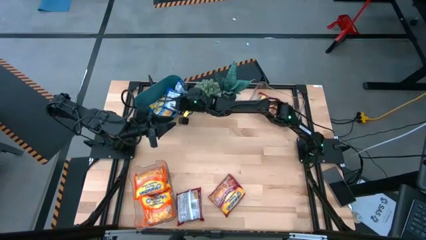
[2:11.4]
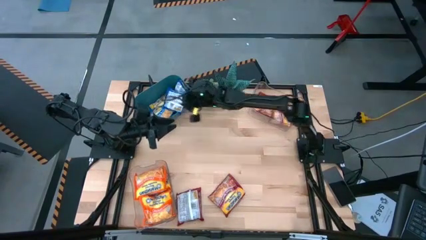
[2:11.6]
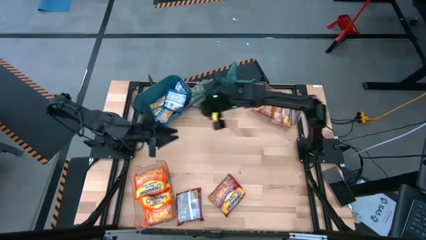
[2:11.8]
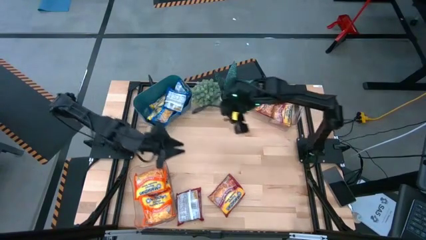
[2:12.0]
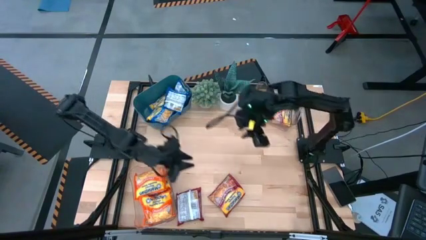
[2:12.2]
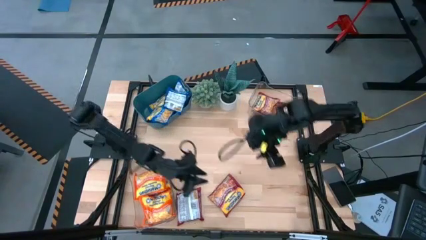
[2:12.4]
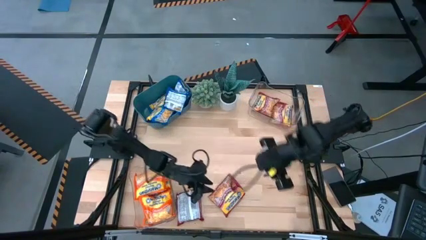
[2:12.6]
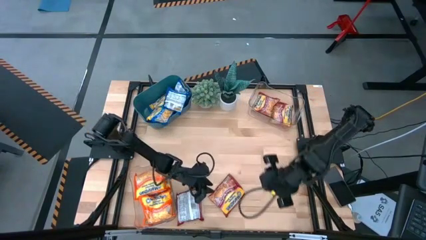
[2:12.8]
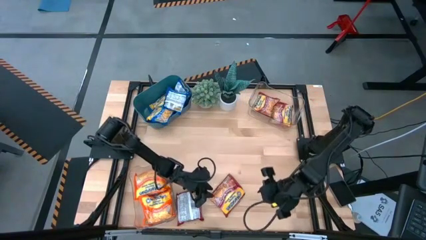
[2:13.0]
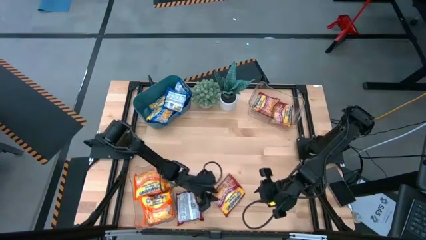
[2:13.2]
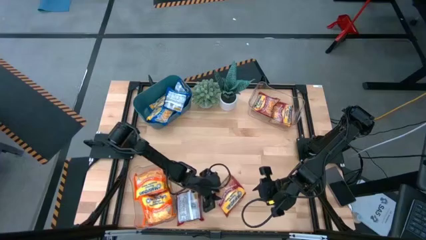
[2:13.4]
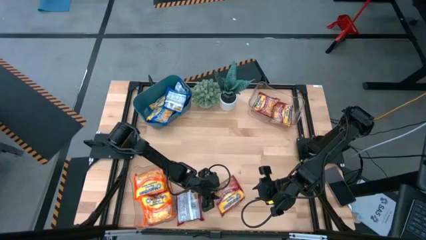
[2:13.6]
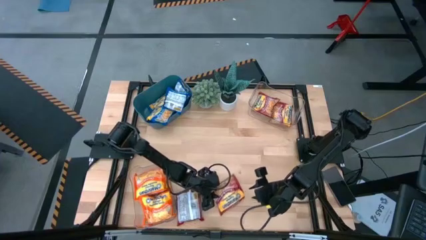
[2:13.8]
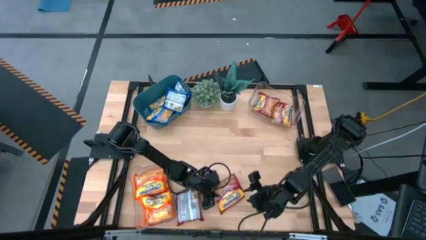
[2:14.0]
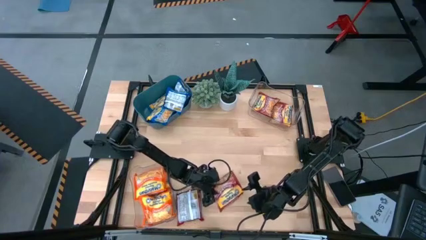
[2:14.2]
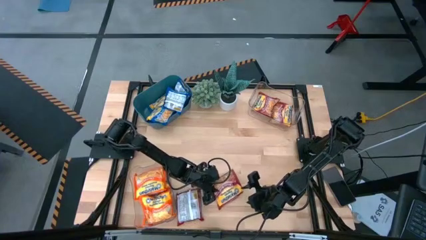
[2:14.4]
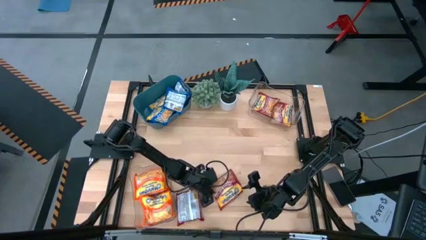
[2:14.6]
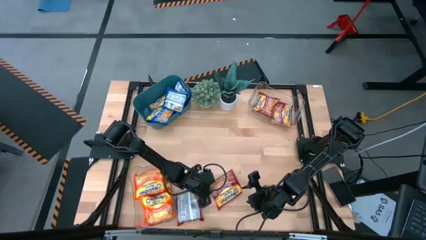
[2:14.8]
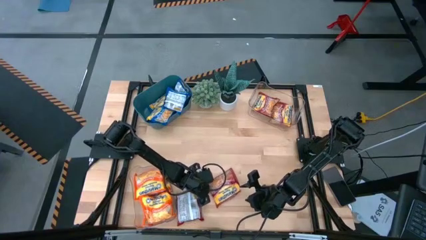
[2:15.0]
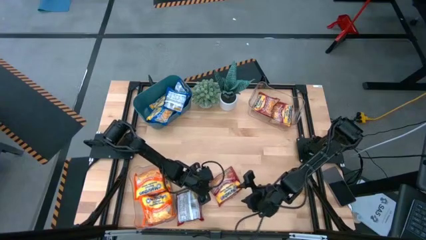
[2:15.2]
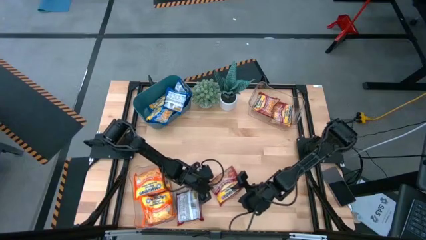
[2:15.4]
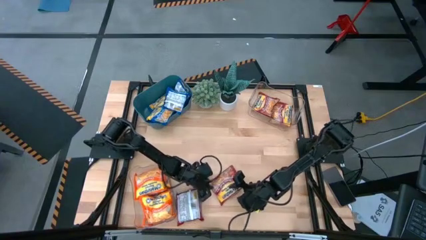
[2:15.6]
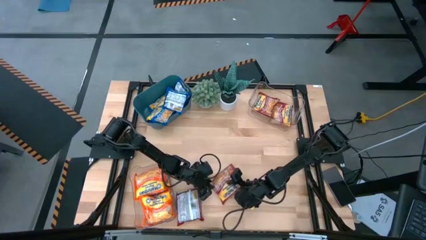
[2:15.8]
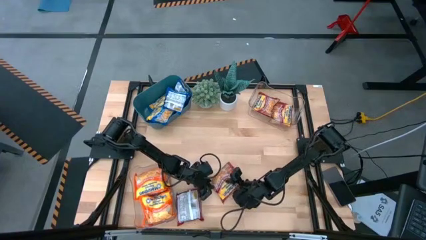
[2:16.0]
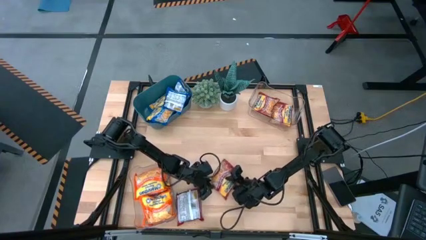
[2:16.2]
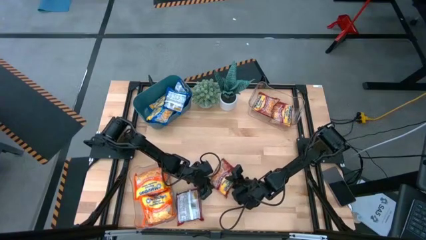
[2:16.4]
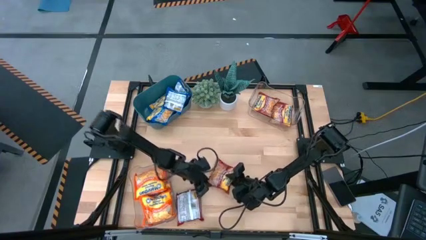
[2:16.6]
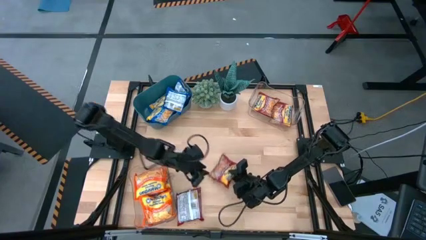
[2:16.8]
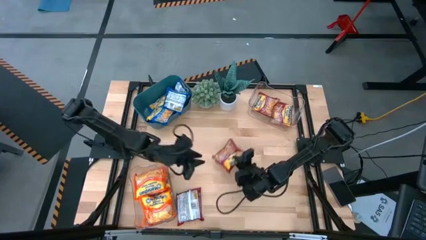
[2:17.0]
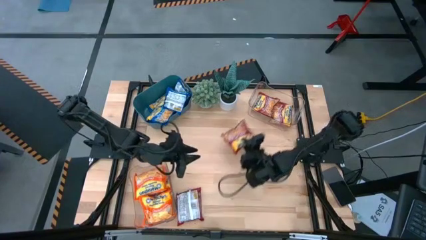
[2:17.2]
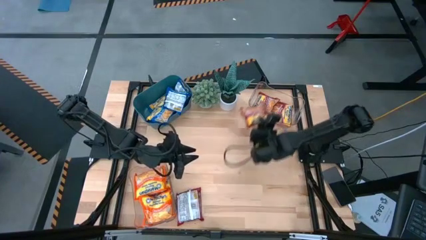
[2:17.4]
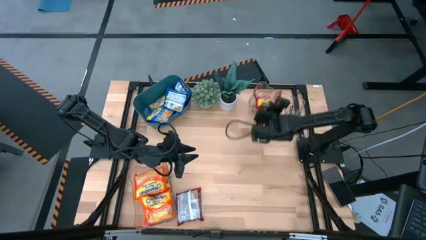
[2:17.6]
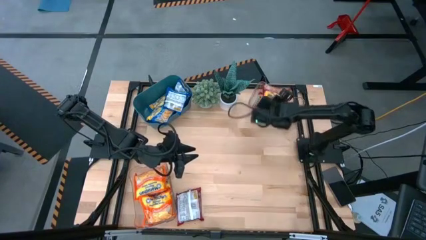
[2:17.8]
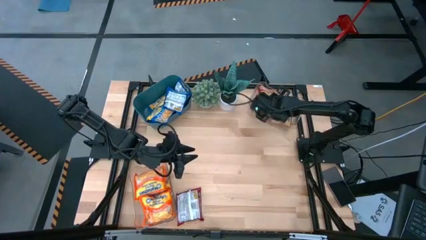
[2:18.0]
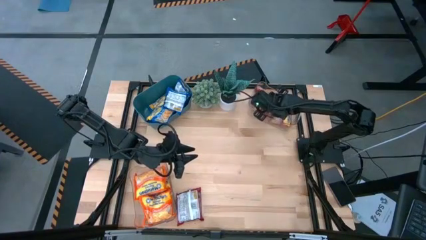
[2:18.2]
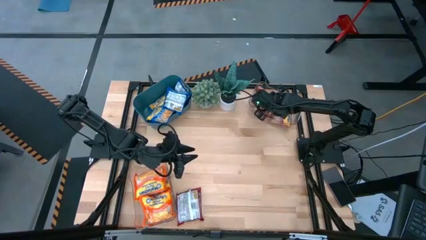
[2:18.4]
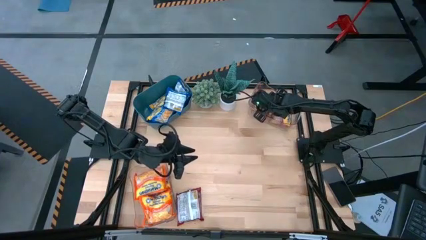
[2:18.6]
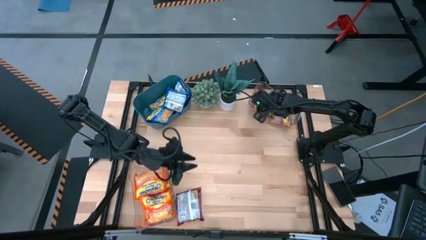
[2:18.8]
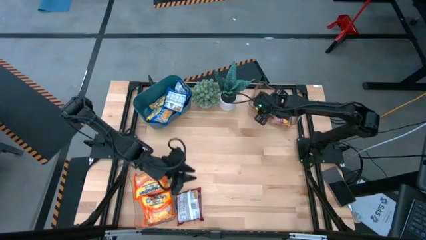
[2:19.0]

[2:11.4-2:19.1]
Task: Sort Maruchan noodles
Put the red noodle pack into the top transparent bin

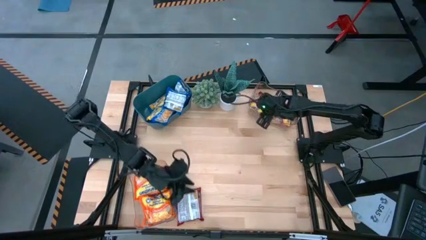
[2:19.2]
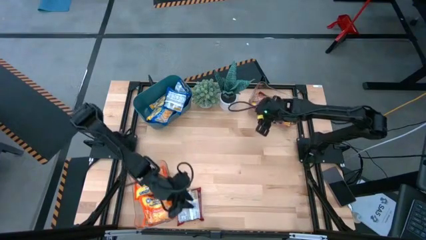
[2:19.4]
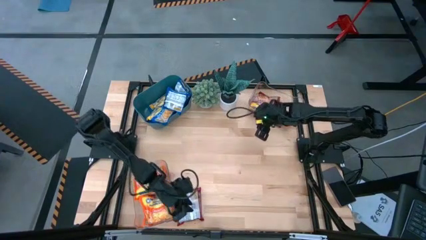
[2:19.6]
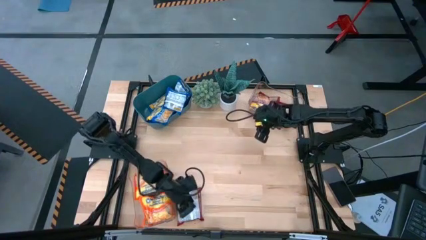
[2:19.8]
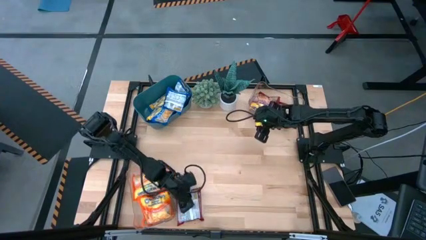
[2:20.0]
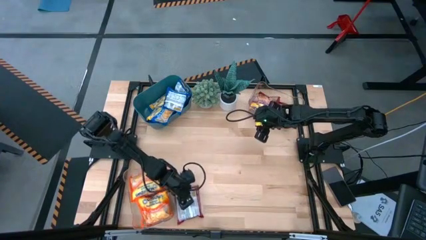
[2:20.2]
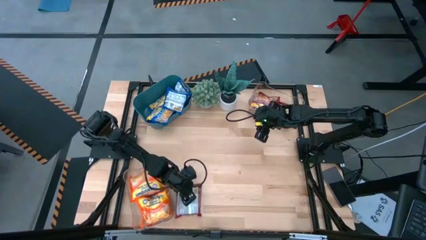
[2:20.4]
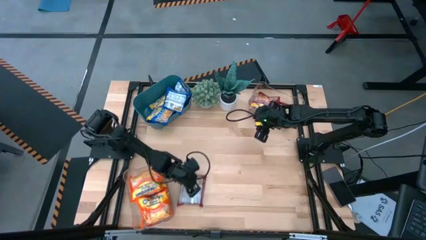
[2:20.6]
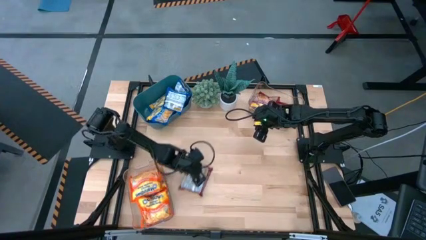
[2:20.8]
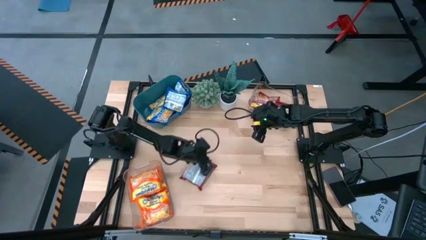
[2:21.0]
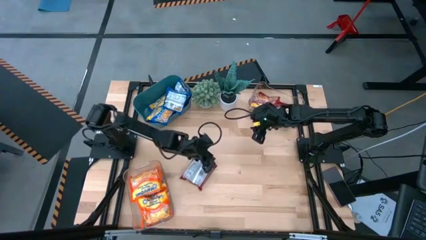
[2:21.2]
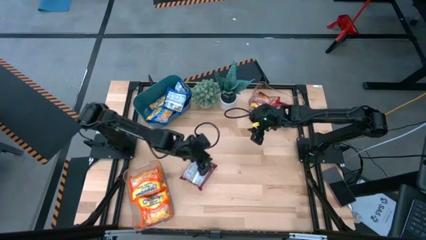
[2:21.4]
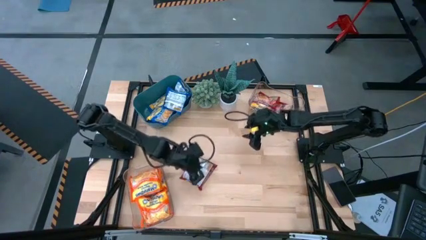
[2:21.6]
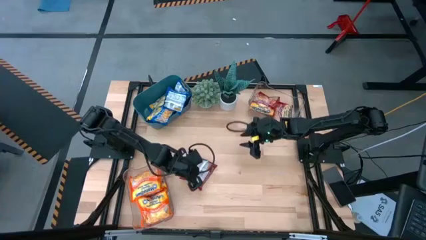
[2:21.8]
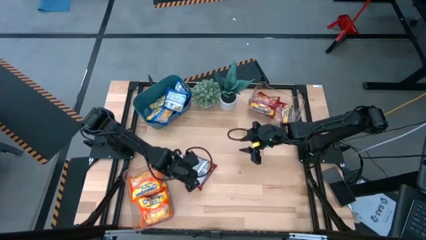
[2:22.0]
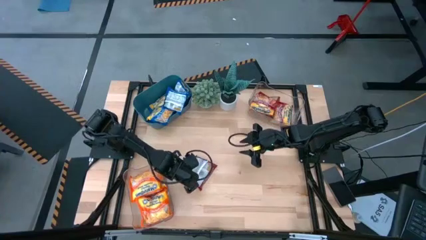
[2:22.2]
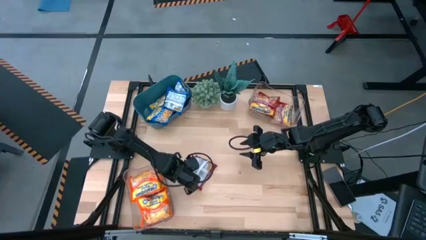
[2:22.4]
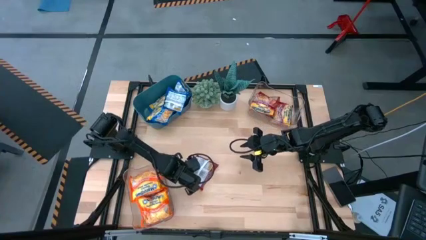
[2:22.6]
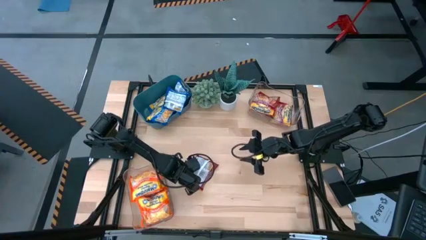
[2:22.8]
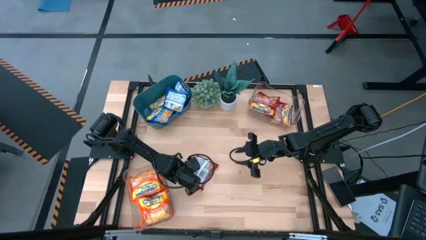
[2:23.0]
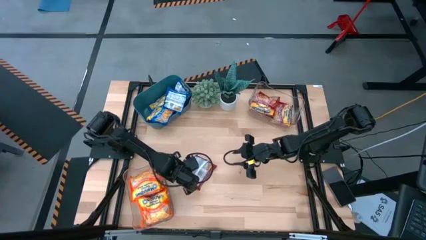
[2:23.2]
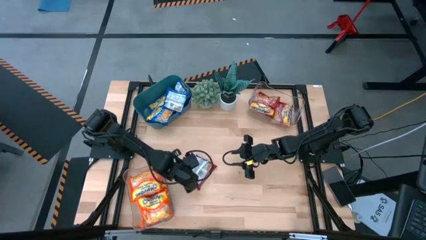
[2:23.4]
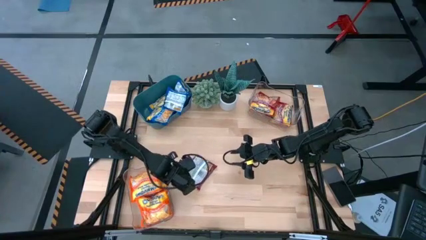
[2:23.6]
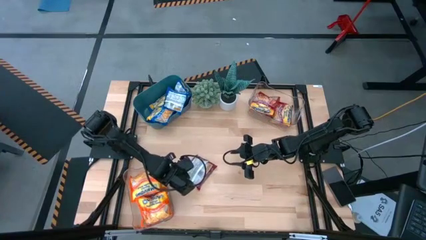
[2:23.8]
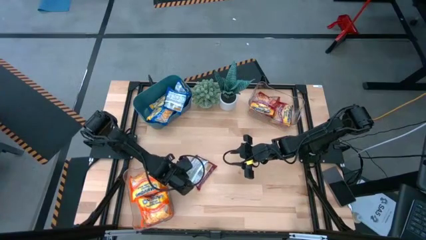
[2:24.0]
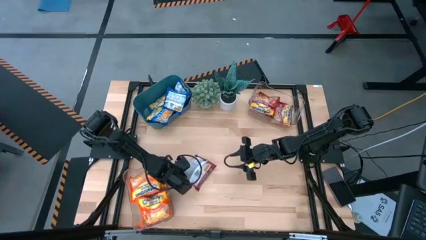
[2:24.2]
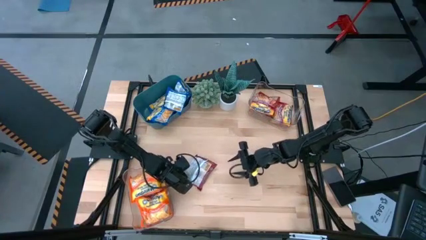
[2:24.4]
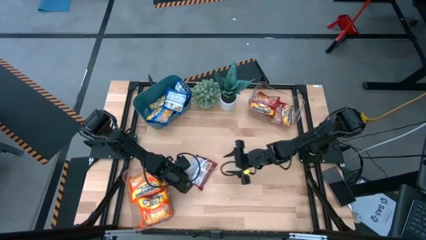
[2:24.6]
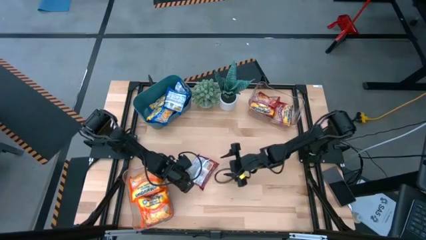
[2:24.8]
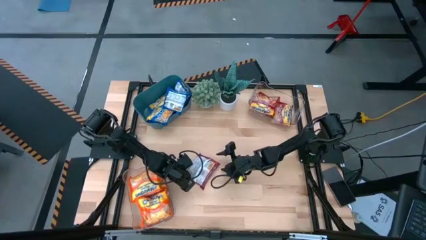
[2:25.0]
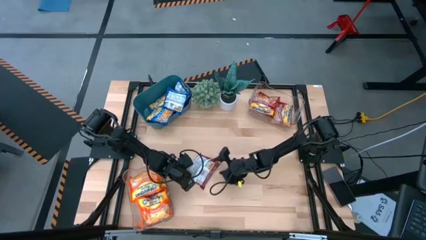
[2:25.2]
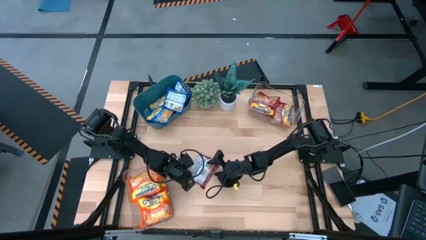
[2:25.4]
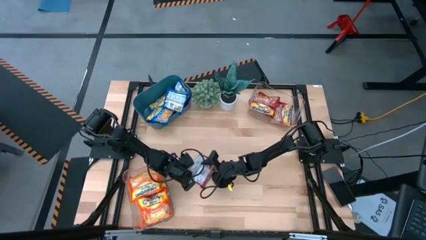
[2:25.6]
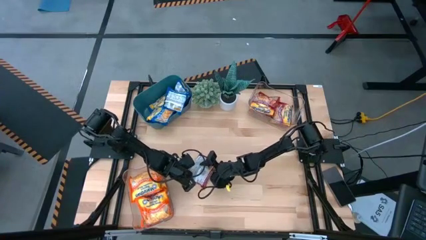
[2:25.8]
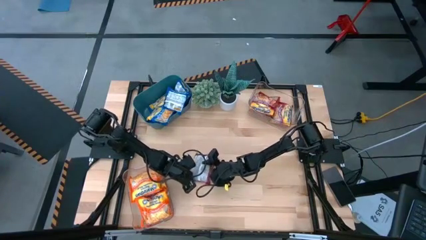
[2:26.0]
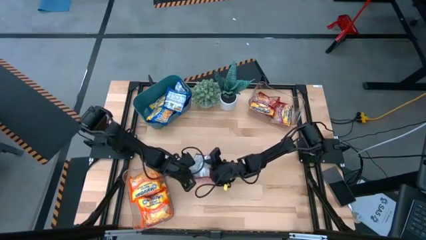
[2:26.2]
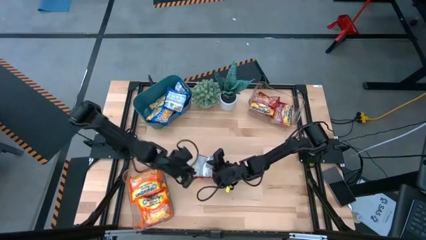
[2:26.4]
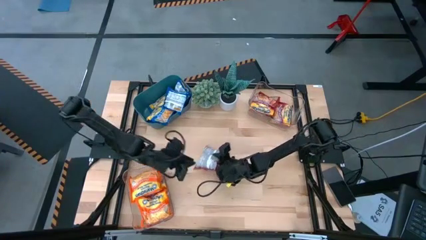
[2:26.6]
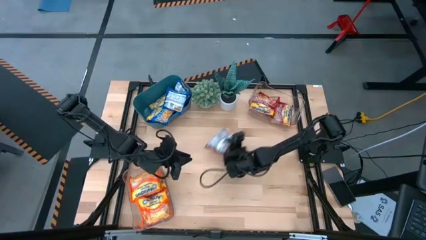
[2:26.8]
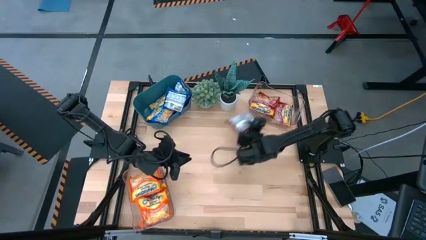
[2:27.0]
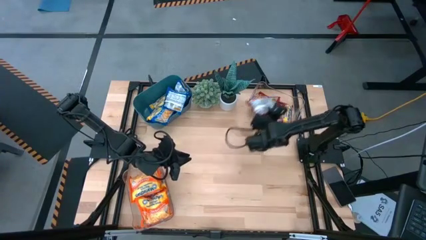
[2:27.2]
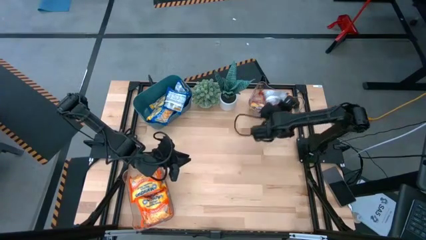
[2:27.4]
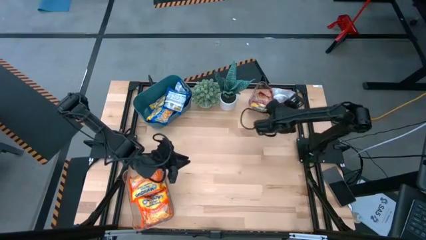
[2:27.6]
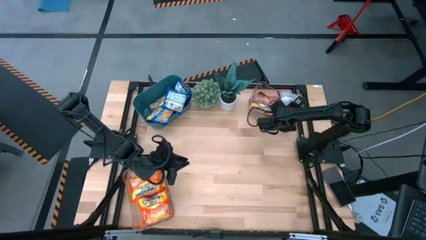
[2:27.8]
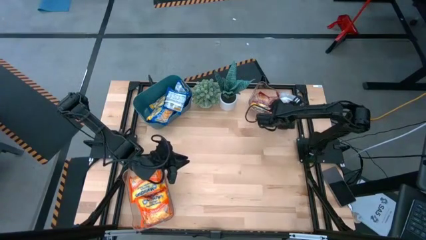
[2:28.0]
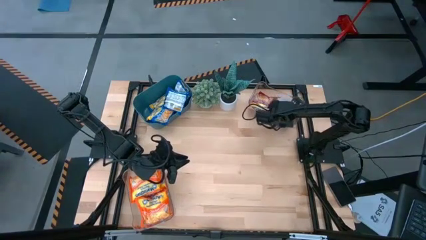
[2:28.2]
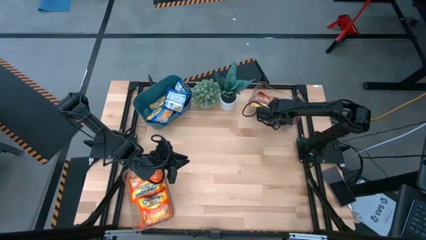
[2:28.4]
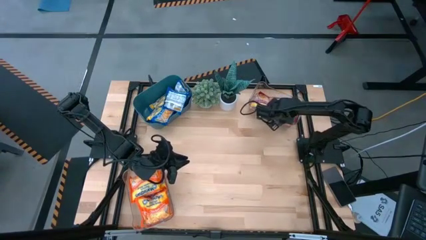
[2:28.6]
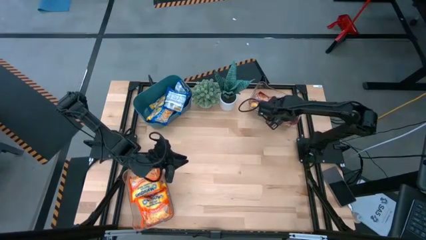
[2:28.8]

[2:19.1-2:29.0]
Put the red noodle pack into the top transparent bin
